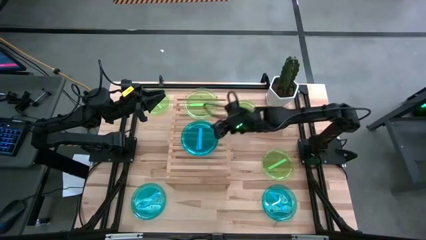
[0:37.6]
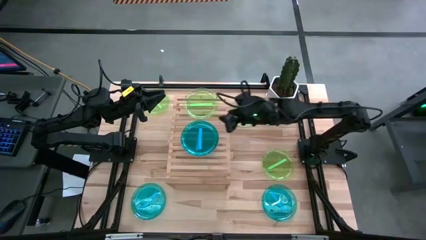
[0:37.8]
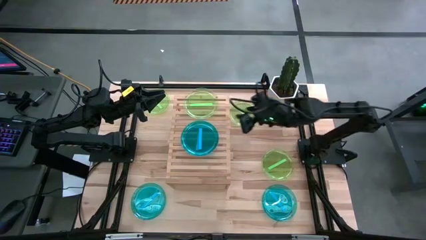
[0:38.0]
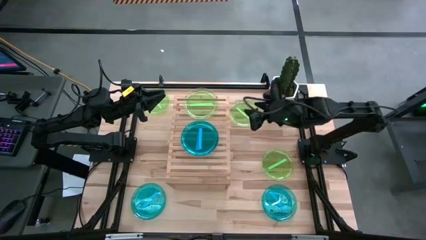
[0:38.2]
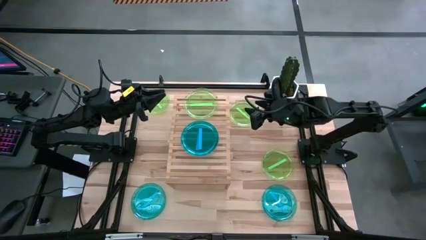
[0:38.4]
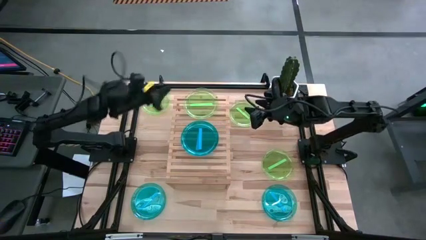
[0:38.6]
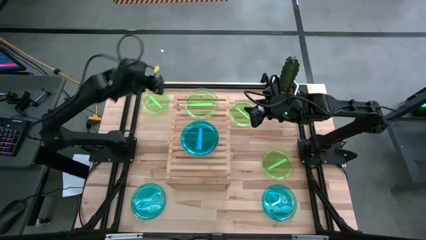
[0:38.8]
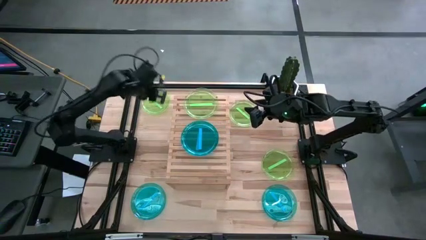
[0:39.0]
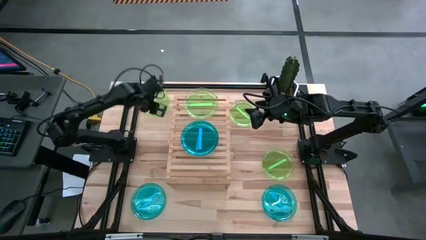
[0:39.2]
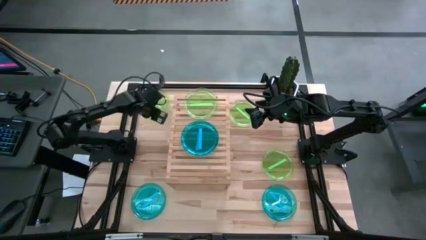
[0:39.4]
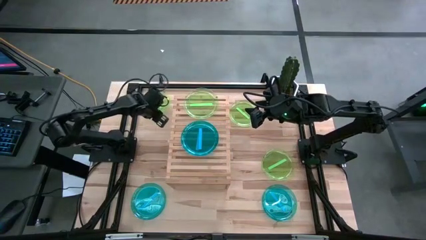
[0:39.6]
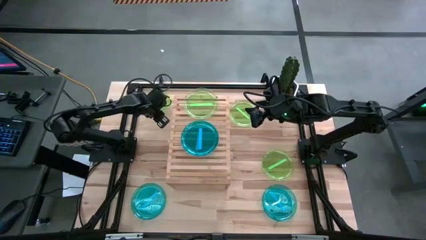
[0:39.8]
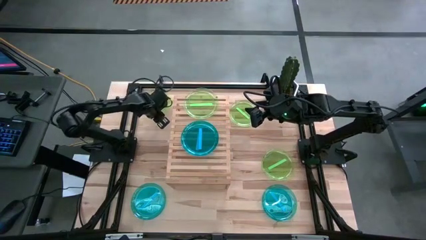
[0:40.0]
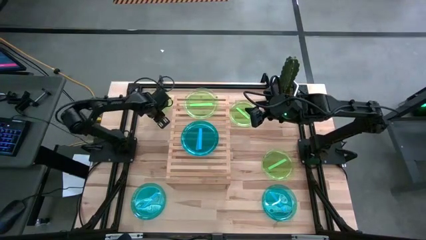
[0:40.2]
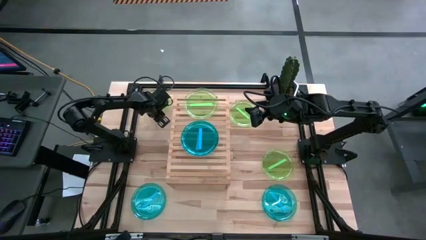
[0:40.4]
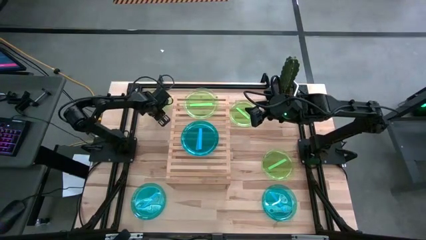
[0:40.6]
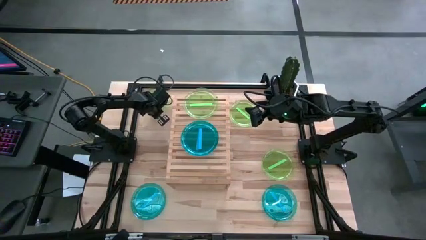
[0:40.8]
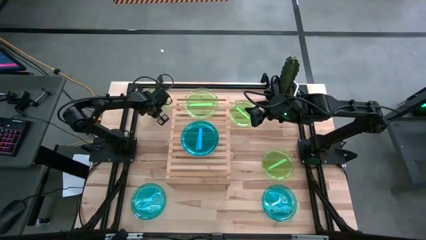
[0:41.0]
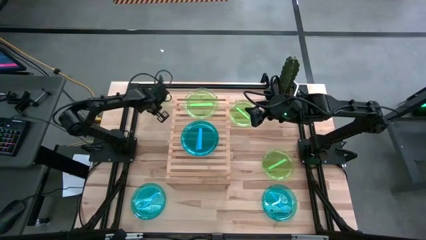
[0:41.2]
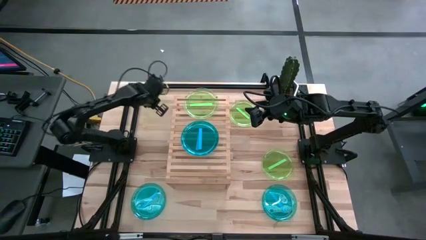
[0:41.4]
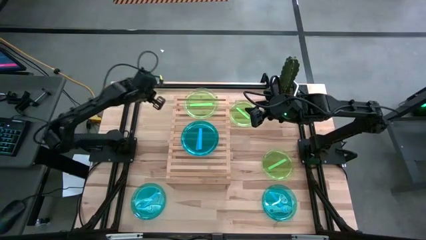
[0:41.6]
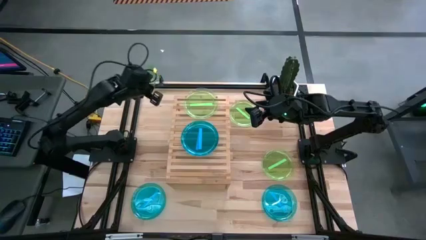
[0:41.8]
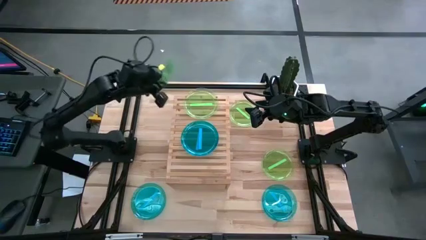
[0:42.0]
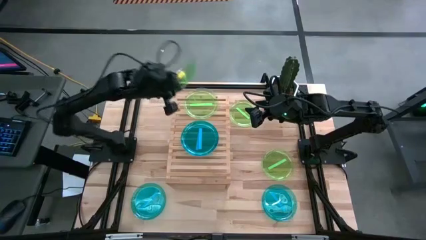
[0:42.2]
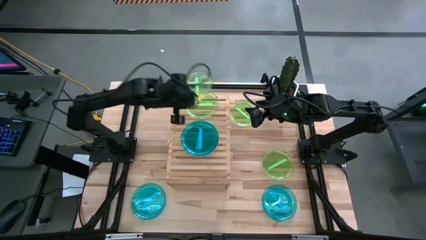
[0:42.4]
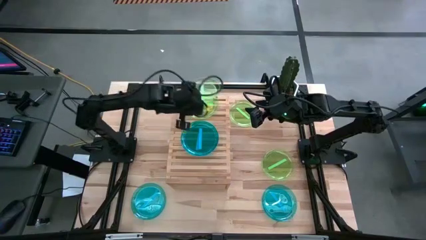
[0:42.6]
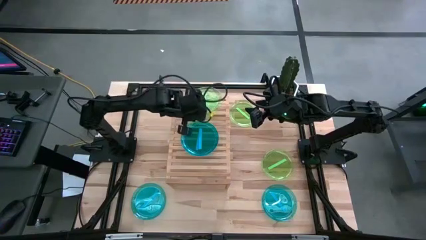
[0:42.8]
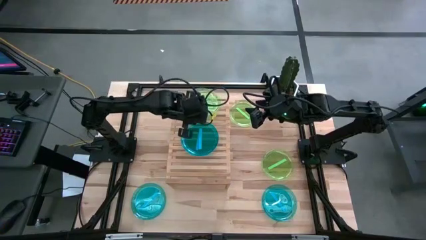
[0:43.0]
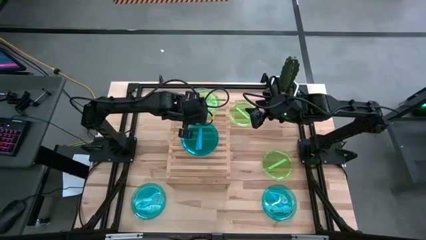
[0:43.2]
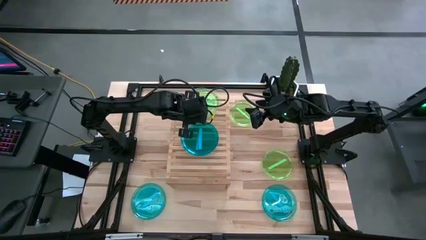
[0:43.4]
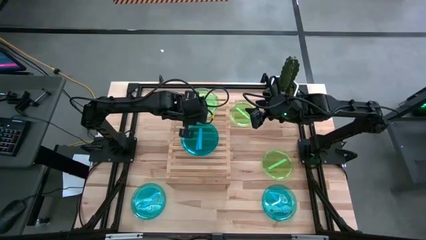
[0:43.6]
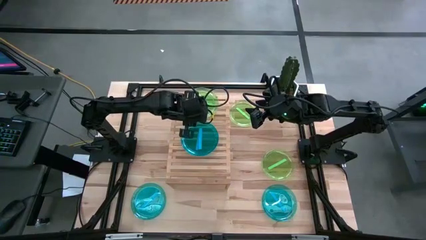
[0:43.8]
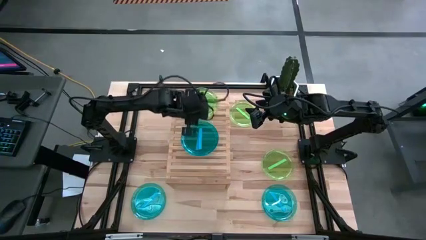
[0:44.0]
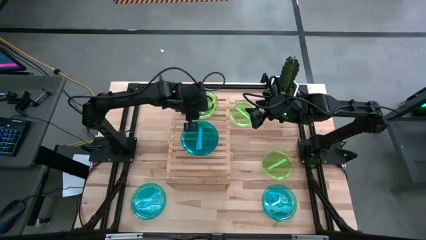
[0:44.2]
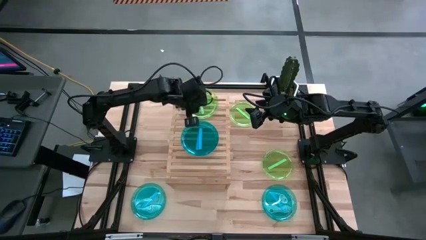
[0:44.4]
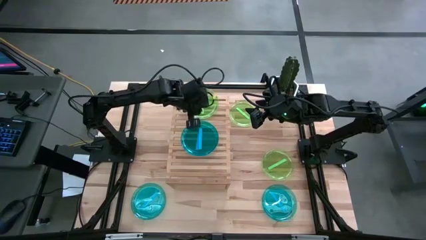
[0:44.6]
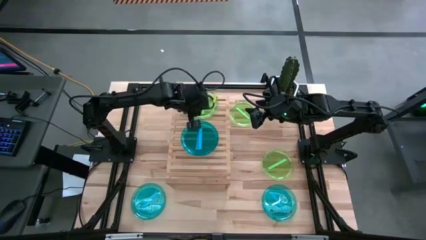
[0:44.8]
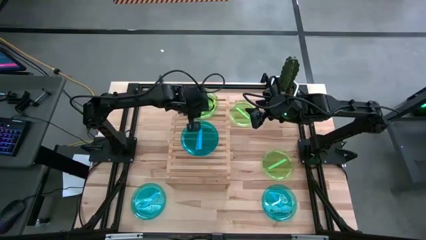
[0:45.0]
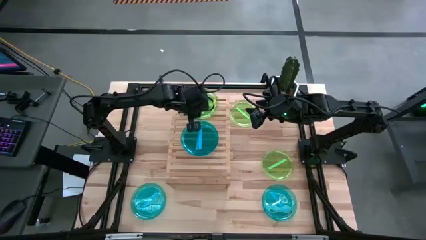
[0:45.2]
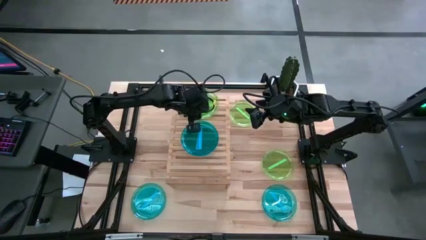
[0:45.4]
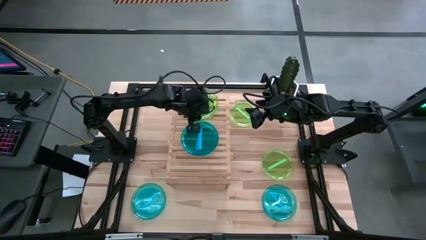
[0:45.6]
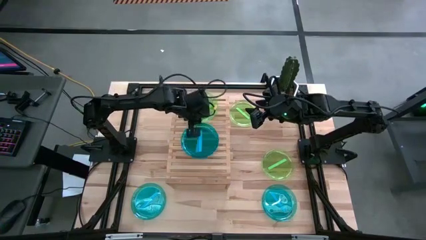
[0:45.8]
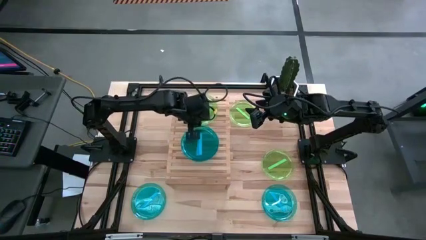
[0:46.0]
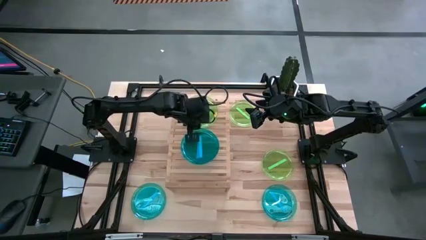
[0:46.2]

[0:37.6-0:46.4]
Task: Place and stack plates onto a shelf
Stack the top left green plate on top of the green plate on the shelf

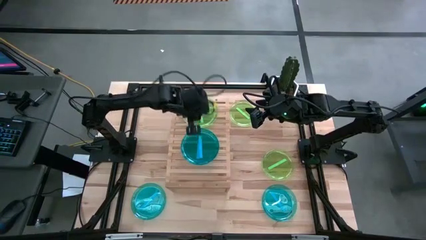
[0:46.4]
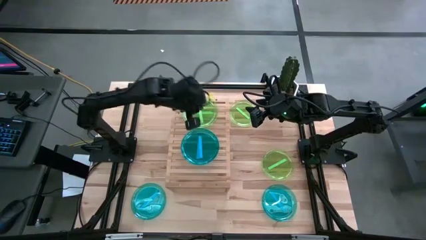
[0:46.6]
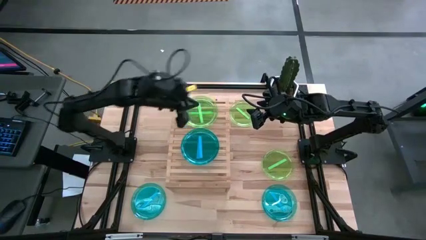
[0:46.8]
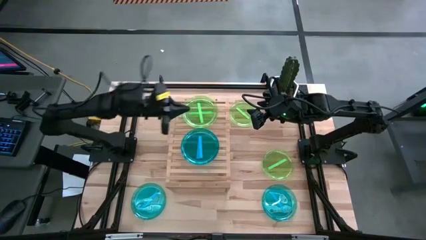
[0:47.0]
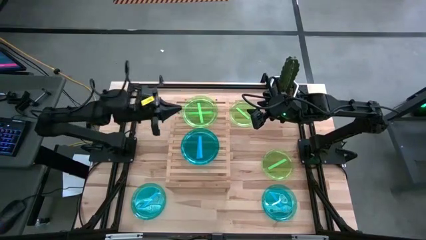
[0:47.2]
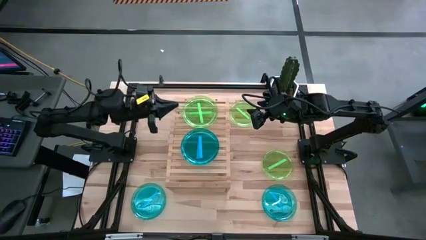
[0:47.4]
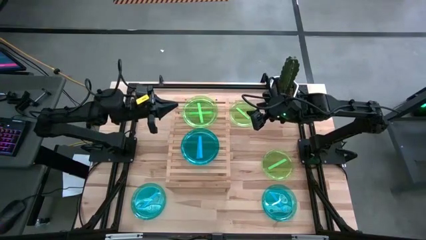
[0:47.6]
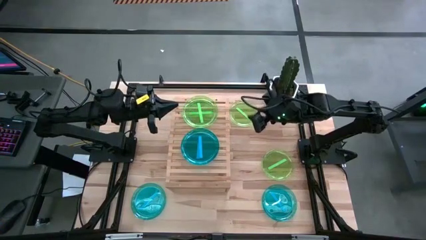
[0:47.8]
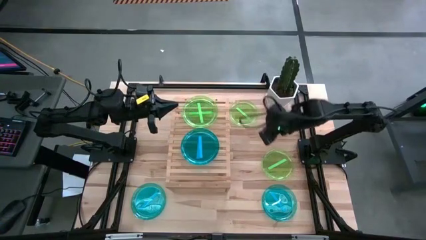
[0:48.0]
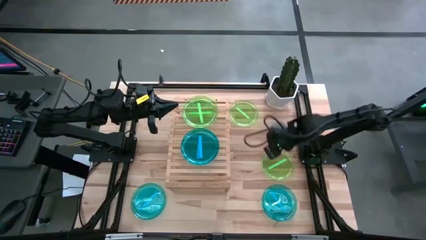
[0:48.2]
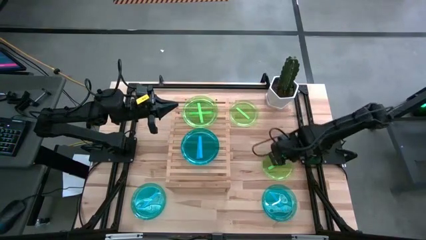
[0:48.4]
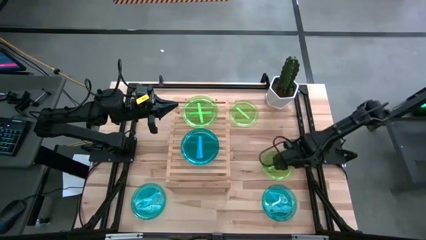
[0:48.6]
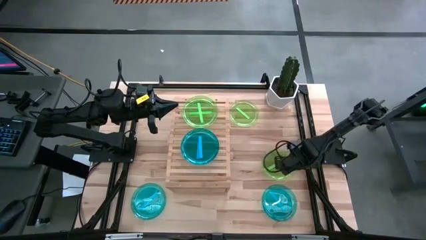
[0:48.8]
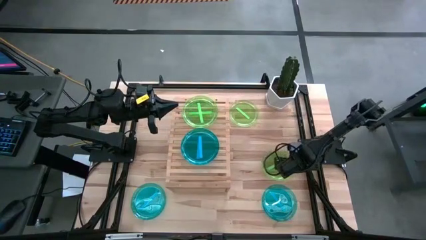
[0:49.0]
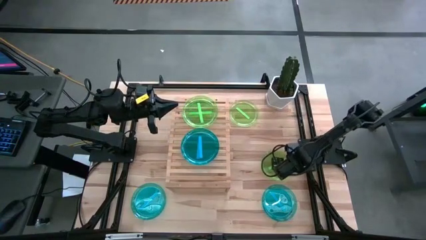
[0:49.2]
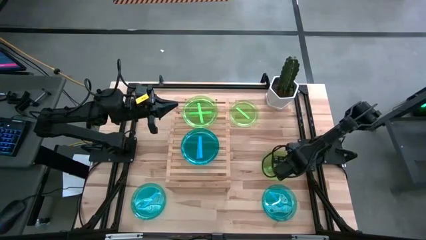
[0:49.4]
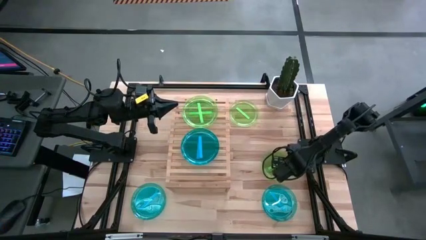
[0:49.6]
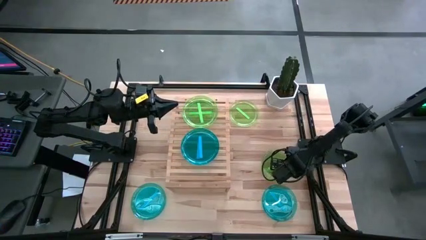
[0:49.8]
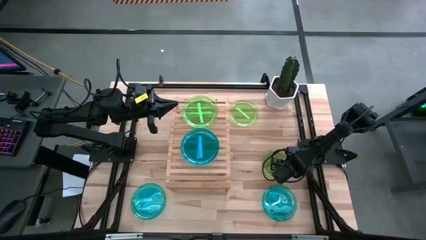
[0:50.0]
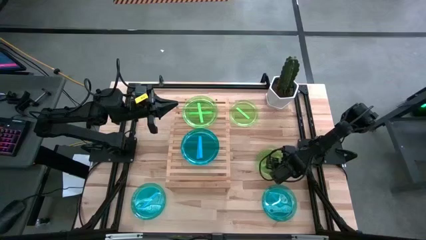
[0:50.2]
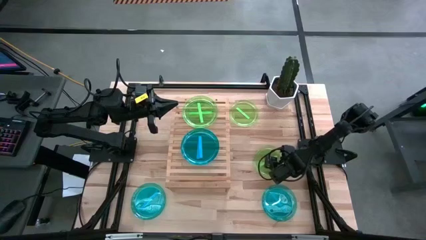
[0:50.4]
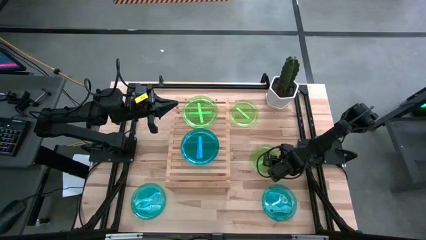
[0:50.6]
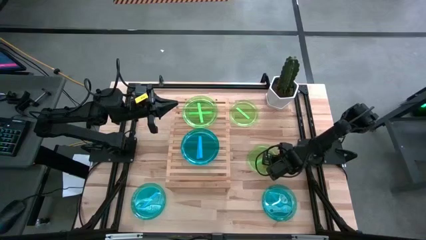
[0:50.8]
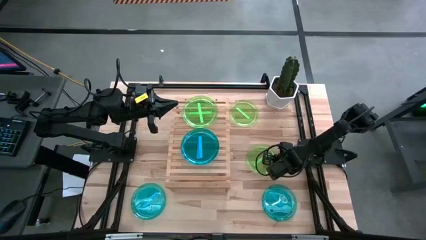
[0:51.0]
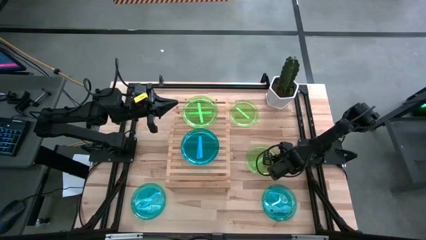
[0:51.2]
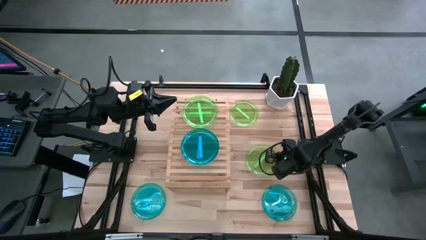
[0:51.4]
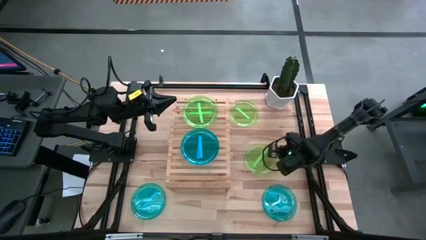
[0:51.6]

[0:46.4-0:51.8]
Stack the bottom green plate on top of the green plate on the shelf

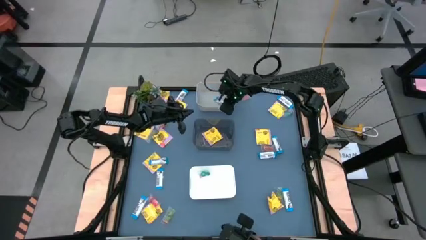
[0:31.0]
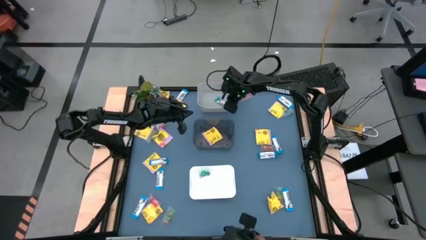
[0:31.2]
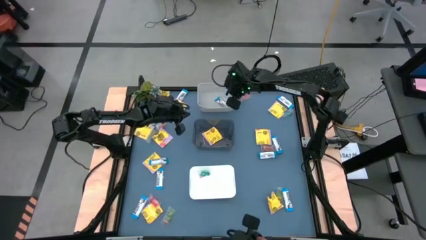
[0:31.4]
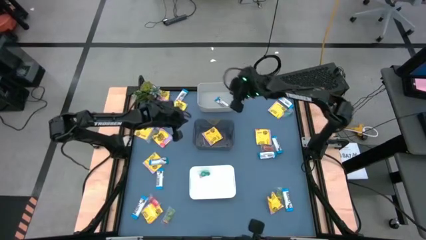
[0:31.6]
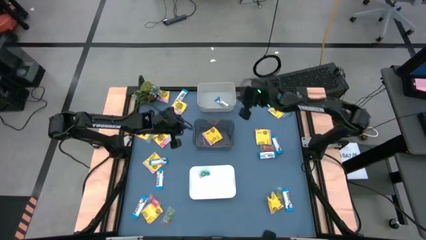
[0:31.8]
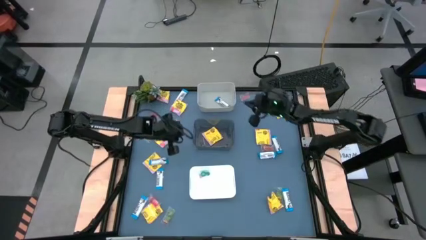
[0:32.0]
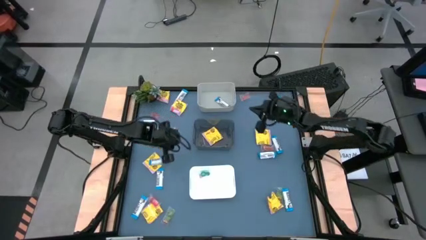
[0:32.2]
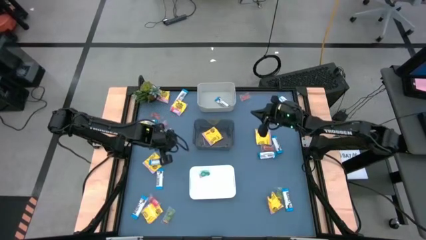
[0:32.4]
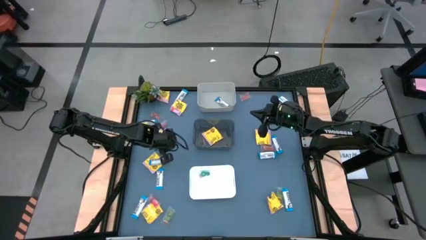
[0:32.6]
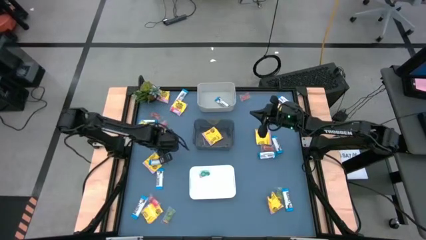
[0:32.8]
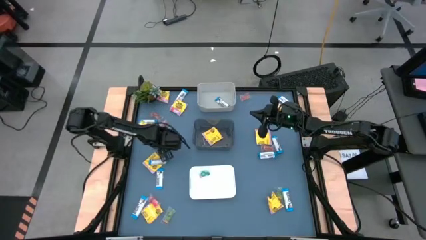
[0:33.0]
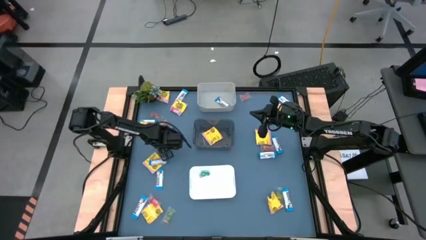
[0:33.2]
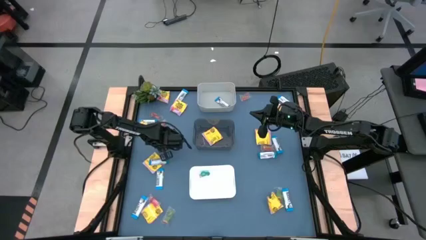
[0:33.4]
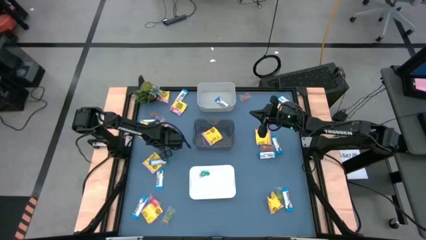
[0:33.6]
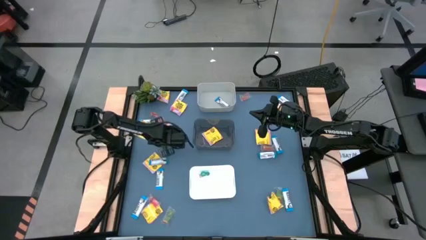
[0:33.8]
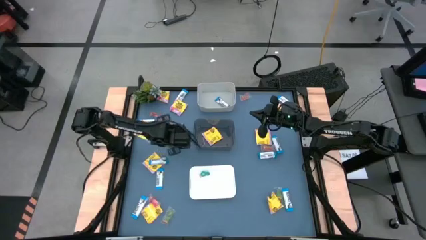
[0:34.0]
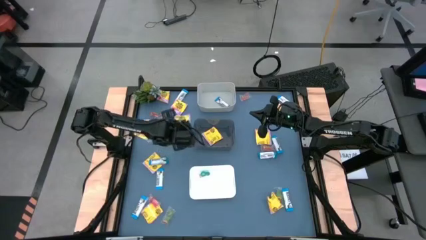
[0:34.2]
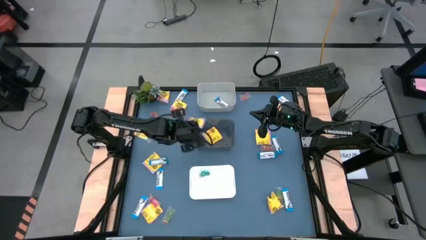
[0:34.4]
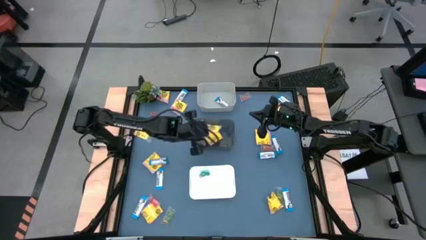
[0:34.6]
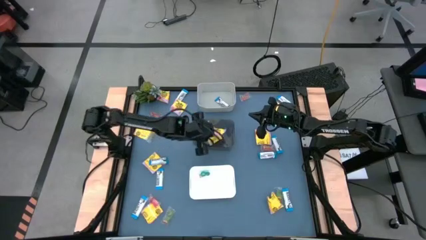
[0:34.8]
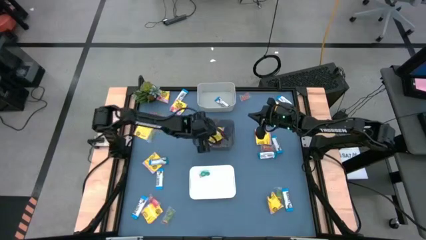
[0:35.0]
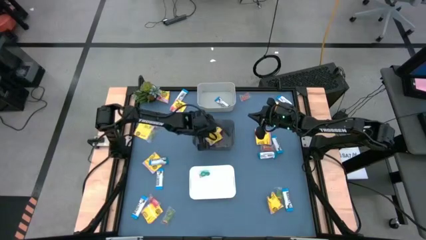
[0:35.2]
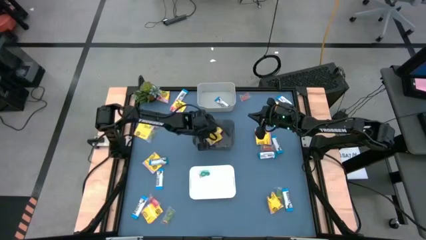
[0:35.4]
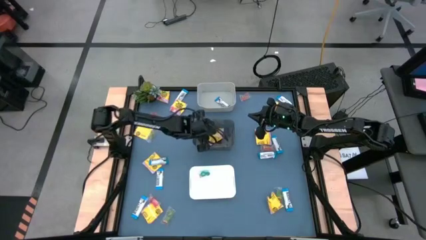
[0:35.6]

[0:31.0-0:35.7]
Task: Sort candy
Put the yellow candy into the black bin
